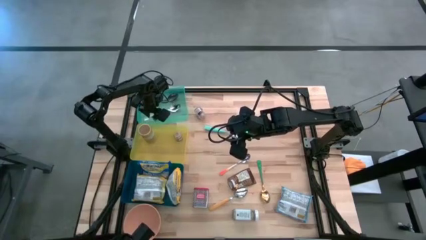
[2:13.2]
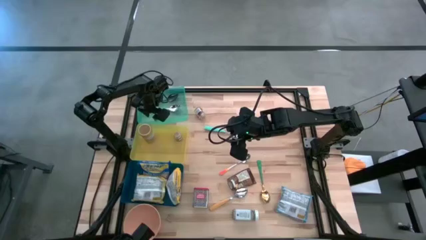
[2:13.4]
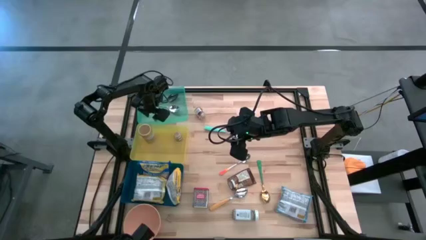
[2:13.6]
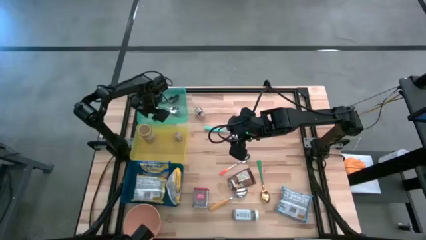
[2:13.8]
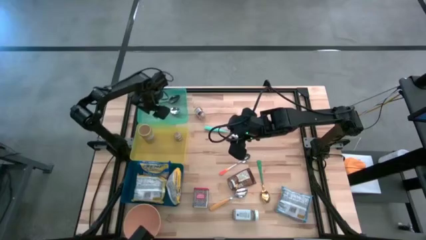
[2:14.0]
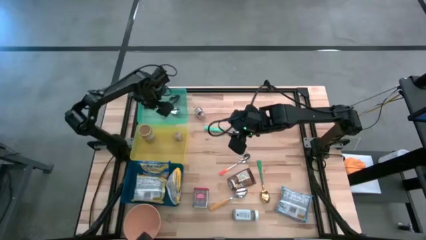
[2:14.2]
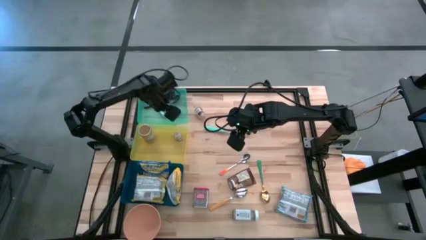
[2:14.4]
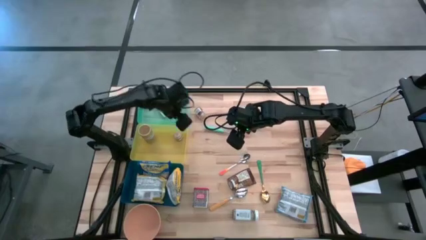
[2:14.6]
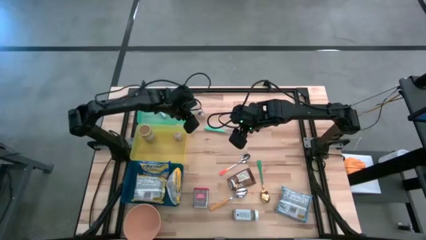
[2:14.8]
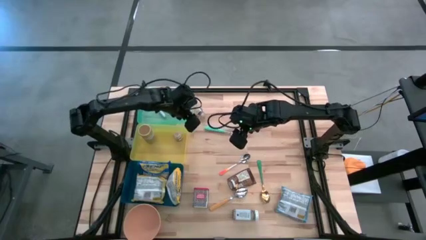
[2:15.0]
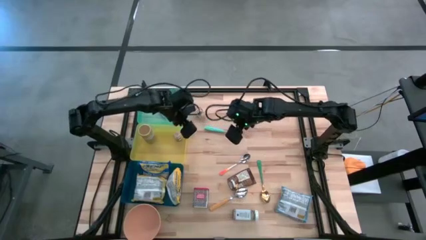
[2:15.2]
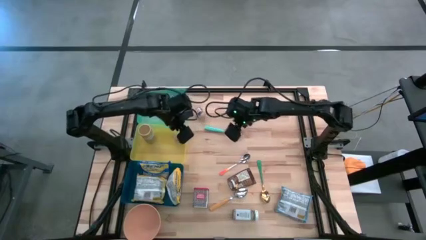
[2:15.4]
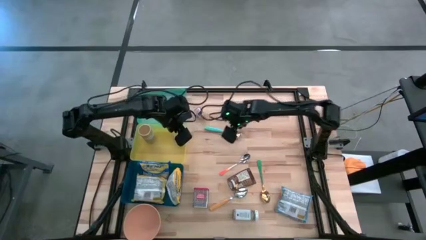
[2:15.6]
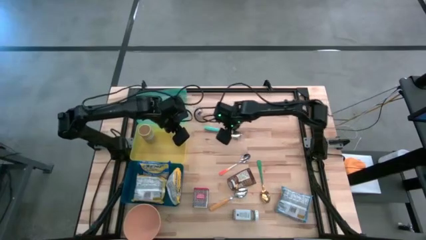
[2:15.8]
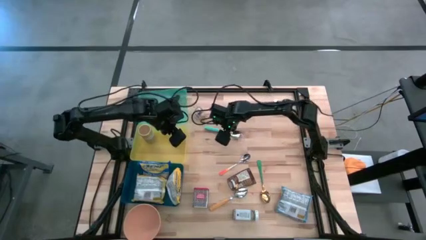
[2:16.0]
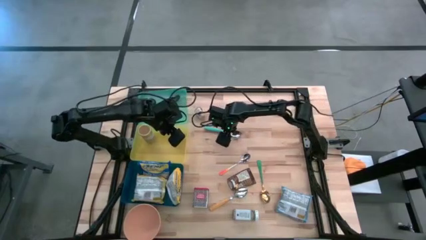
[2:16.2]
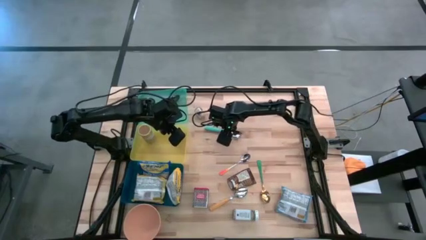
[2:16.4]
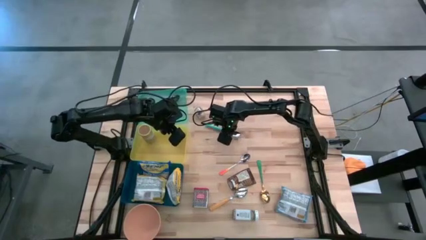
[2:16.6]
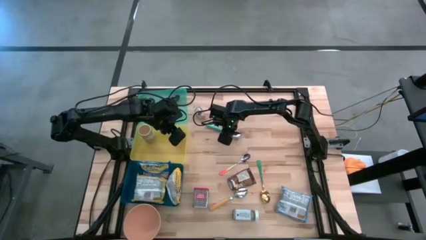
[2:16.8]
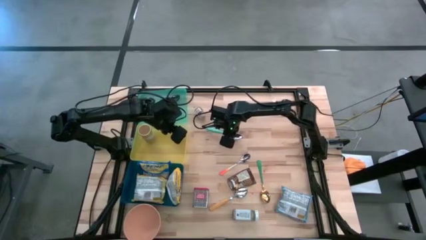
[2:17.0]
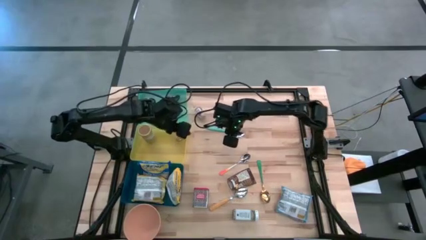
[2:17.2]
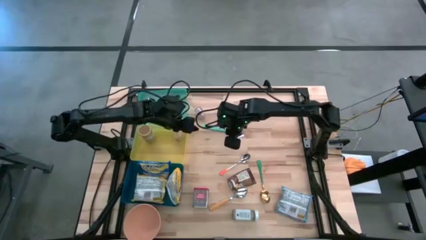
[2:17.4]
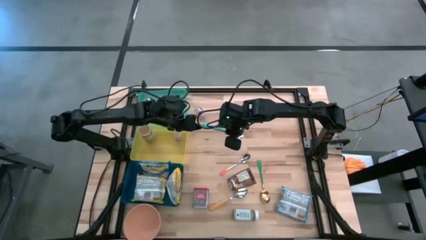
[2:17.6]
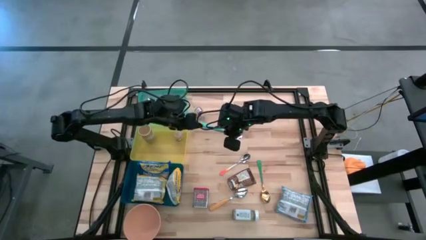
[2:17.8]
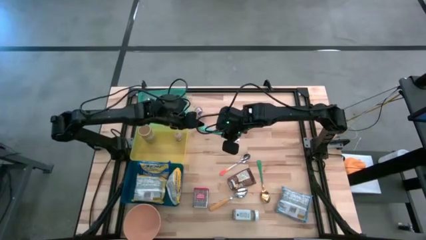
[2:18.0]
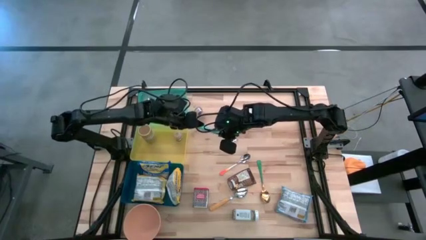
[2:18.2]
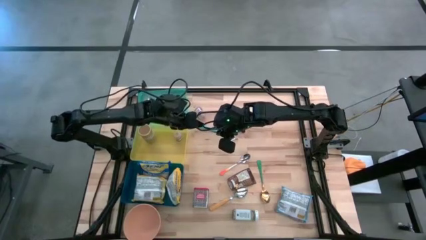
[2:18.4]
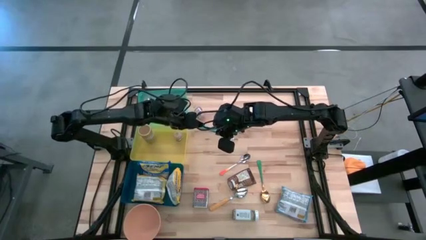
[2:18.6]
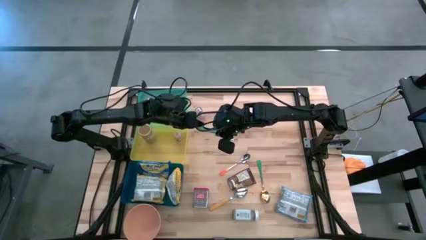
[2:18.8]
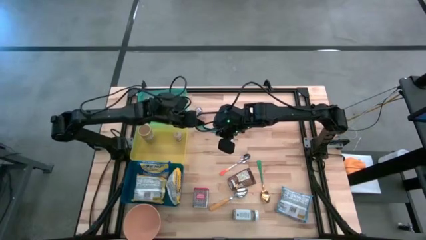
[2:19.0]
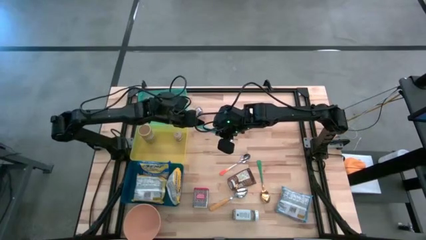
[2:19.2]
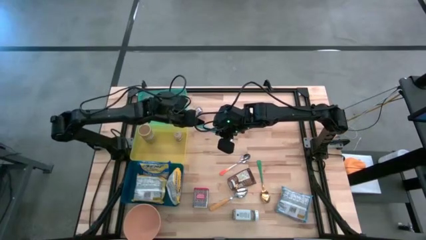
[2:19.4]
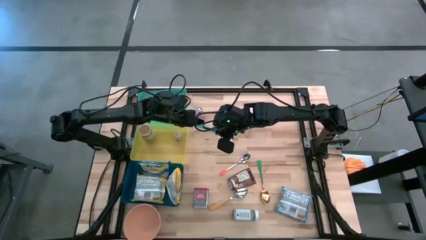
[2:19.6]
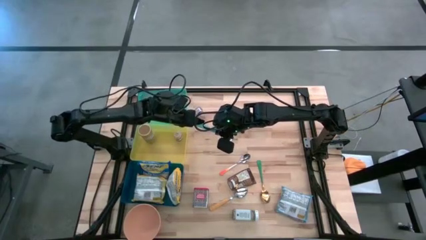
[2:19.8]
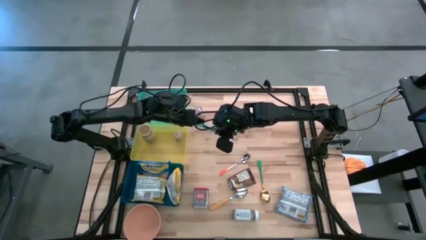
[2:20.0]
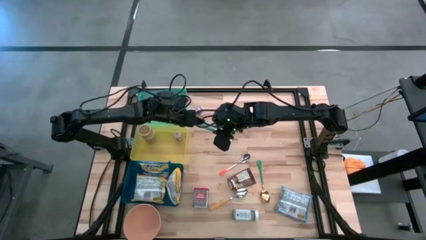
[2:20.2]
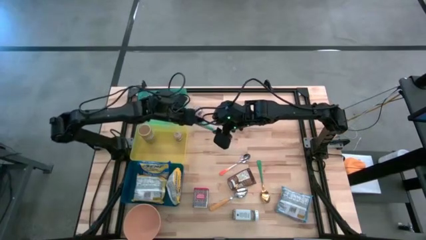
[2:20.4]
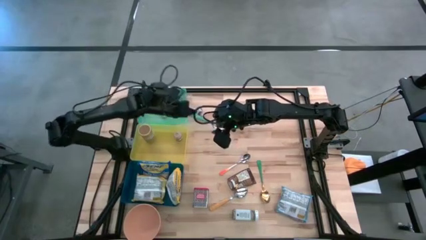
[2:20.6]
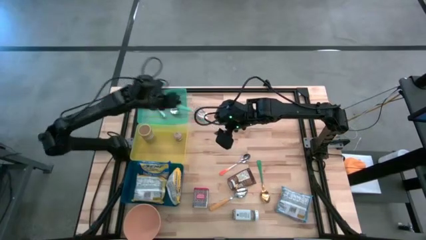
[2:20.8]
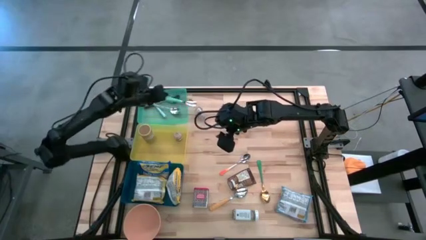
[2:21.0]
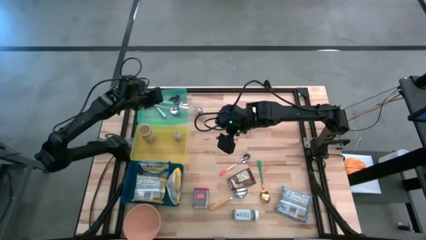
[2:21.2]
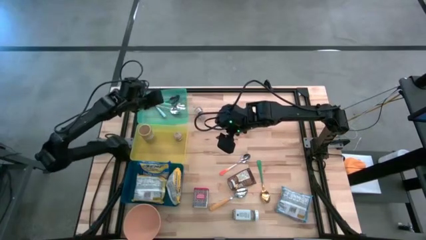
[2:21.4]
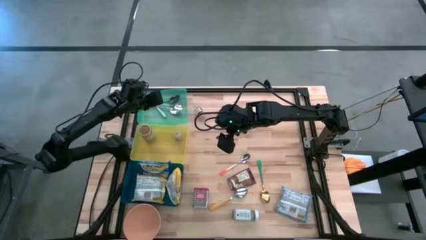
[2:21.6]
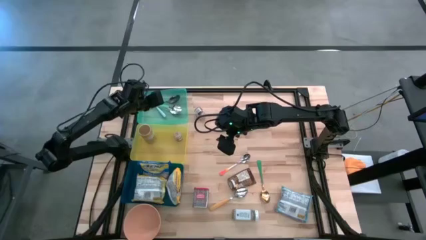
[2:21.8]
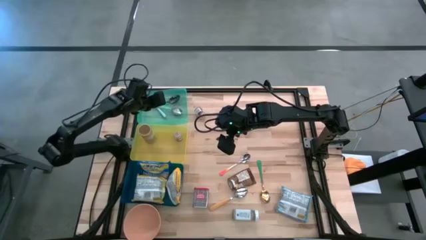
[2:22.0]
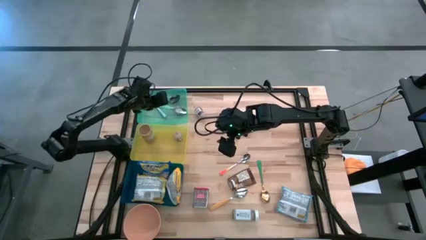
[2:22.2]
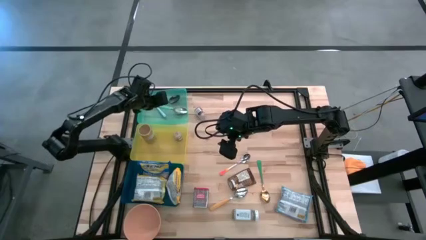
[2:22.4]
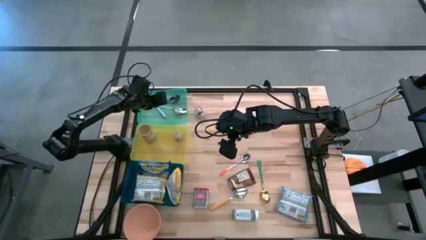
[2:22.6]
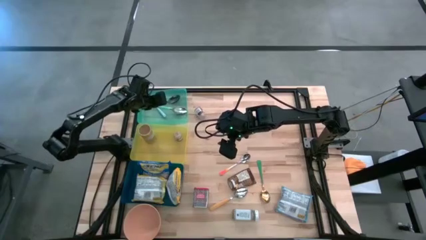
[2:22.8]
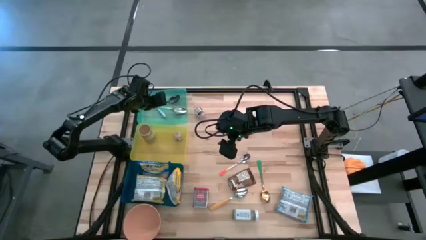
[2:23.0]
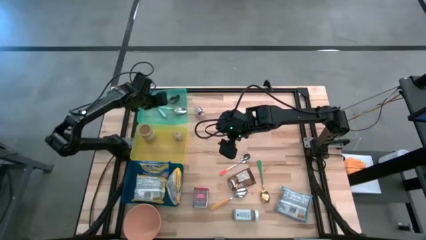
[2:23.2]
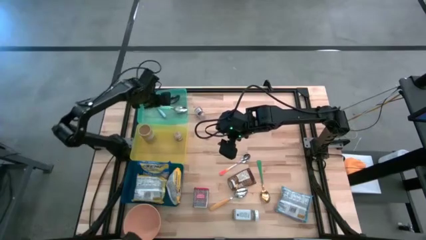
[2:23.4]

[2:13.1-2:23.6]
Put the light blue spoon into the green bin

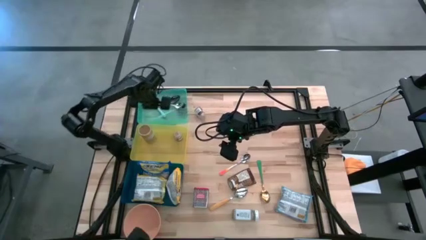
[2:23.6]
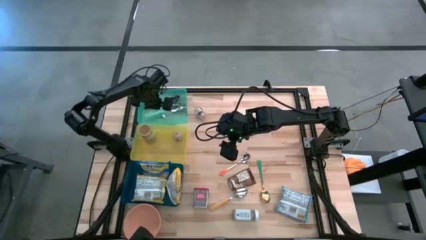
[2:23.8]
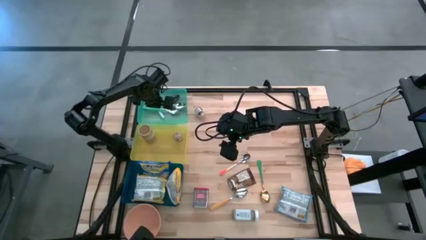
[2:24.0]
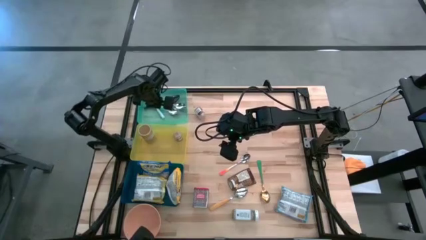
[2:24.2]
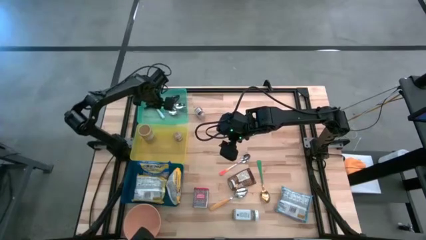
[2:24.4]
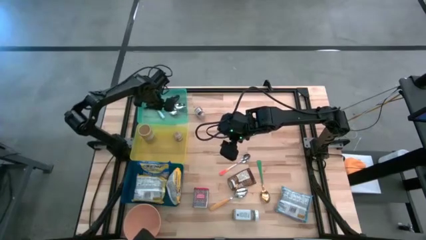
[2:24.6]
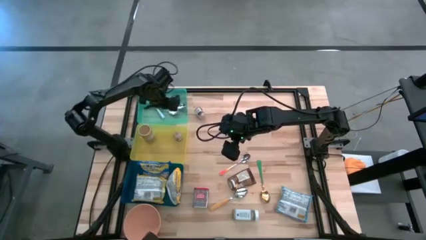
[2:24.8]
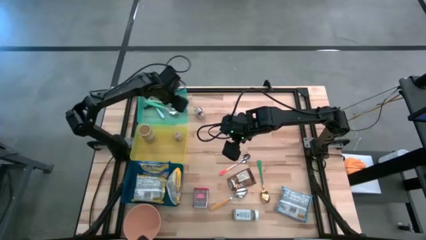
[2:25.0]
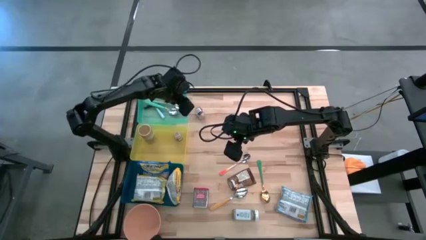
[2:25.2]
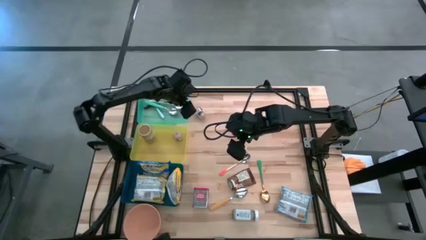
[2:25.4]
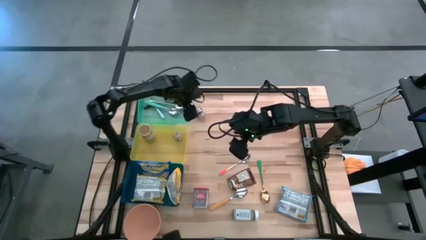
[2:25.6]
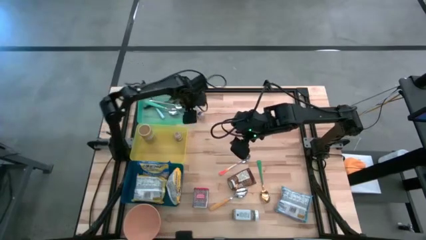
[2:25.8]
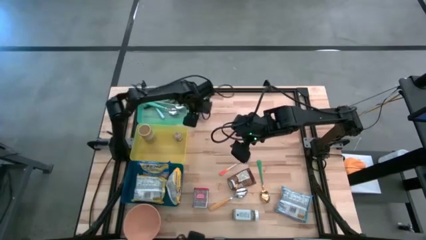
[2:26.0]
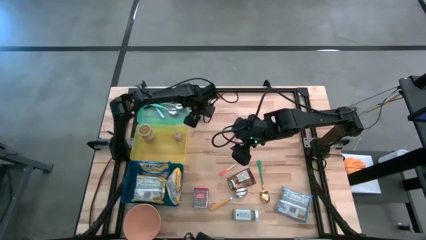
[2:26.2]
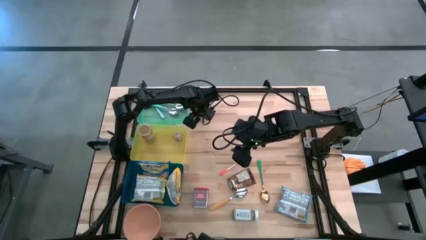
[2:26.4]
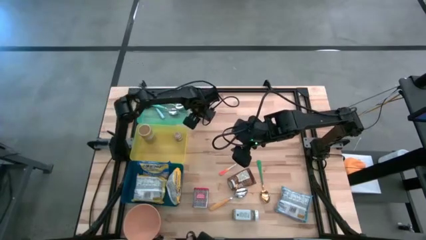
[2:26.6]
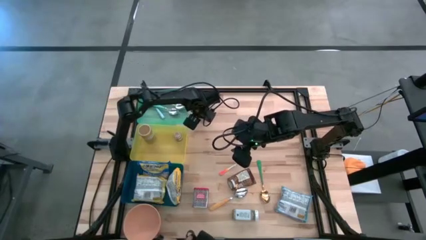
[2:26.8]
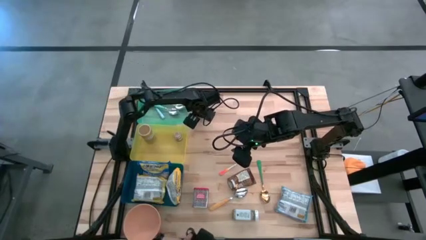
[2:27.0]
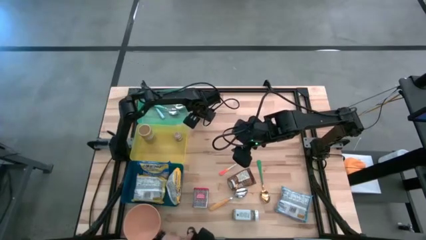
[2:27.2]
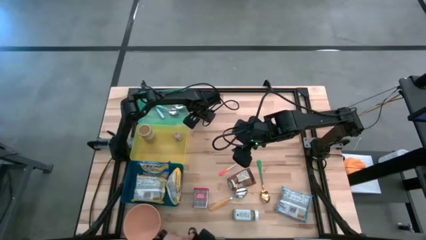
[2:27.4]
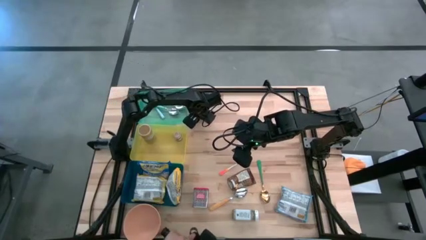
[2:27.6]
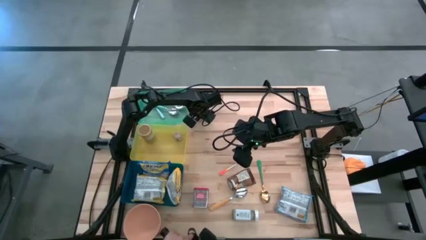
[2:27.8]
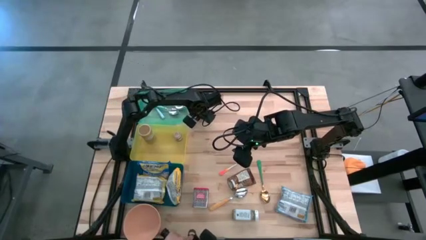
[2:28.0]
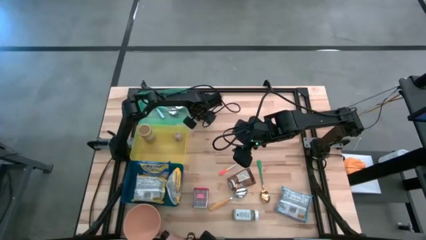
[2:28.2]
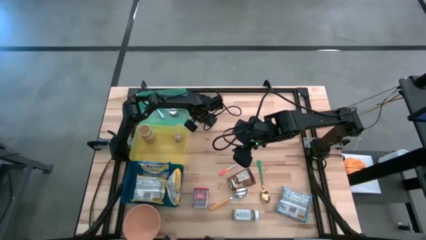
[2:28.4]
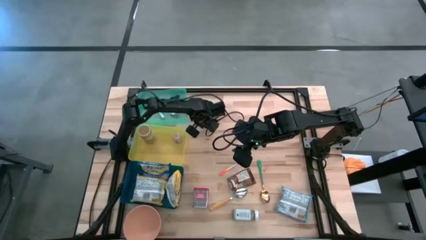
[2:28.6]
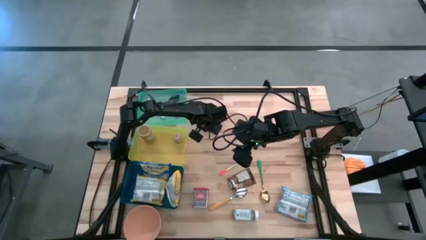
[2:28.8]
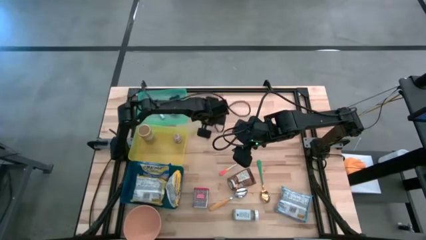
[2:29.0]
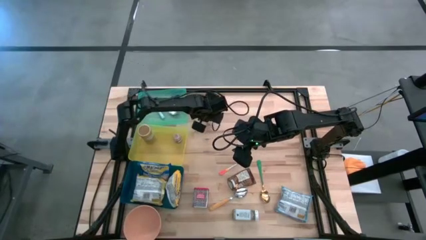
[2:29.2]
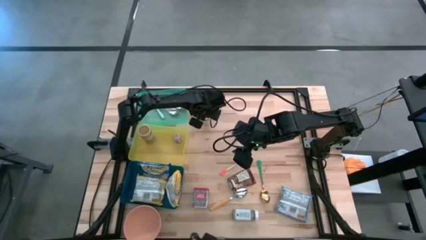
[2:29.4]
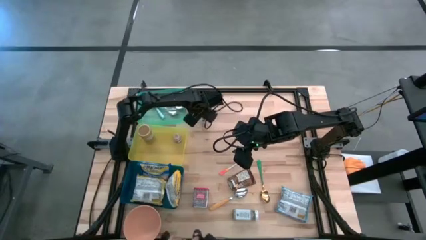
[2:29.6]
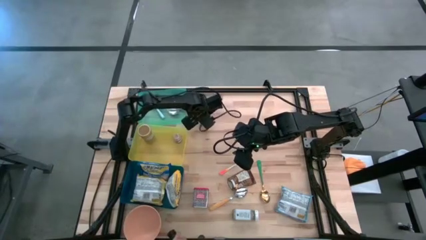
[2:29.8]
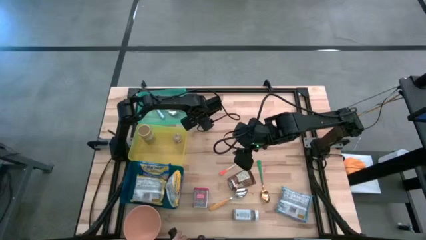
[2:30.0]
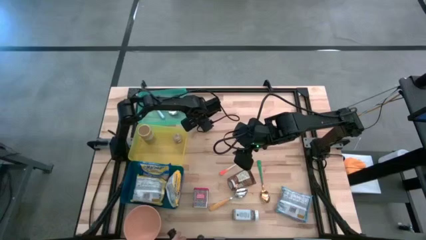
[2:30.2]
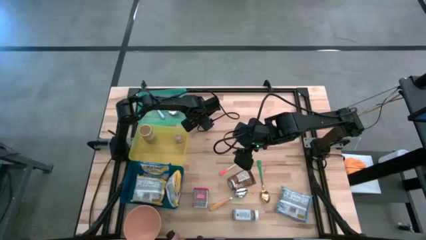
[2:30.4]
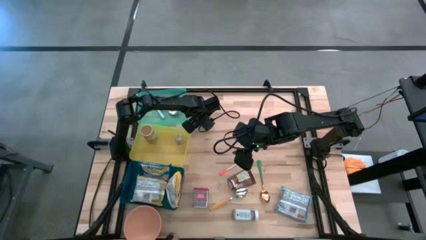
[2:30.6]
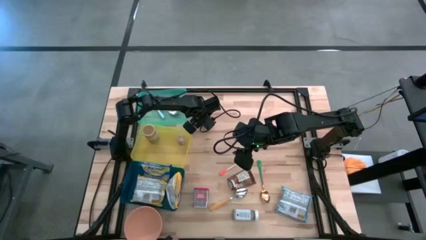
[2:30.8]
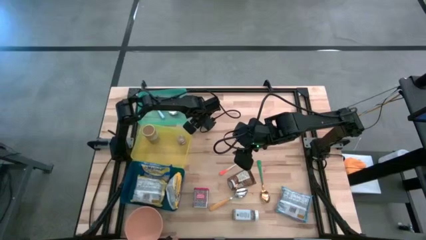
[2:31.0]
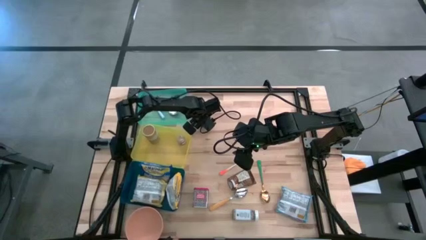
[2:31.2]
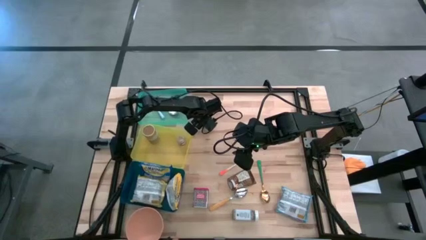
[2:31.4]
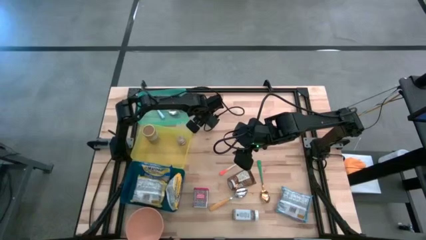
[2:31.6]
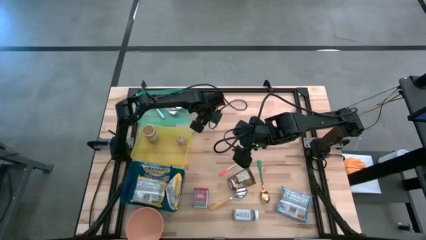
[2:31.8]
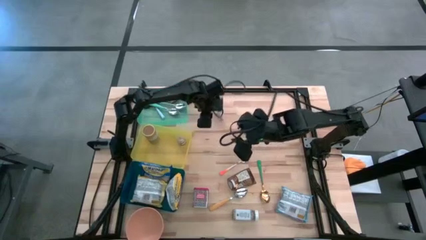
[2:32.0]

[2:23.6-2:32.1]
Put the brown seasoning bottle into the yellow bin
